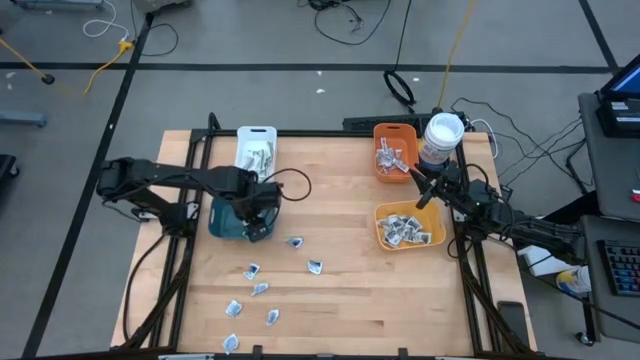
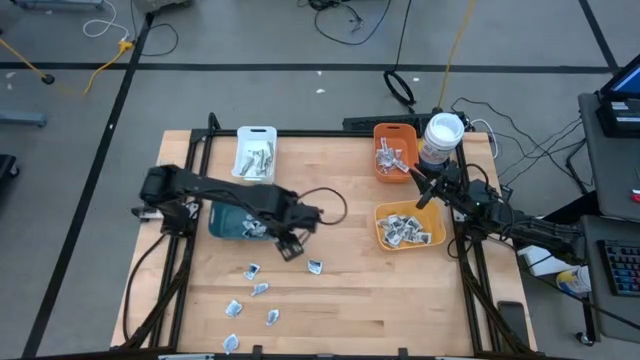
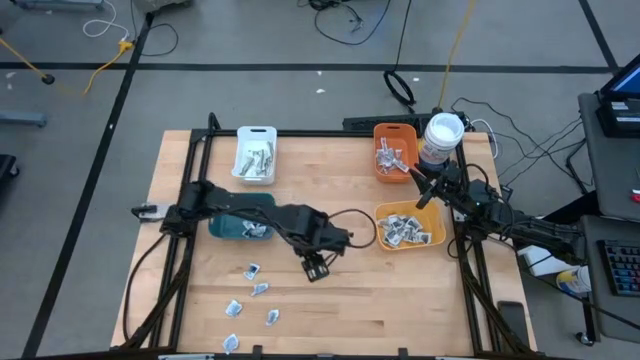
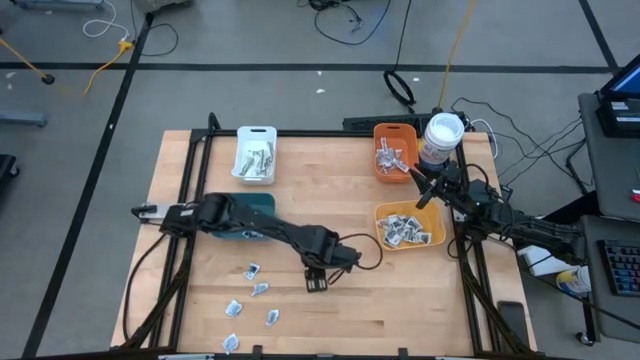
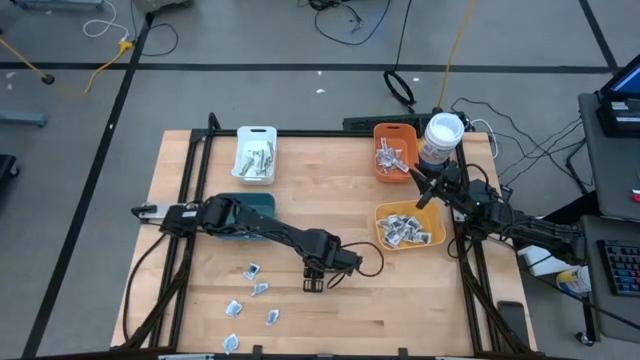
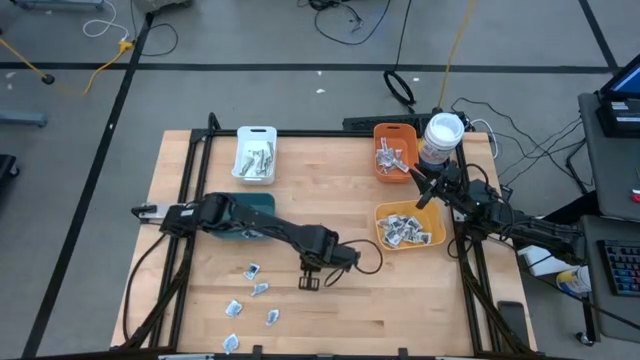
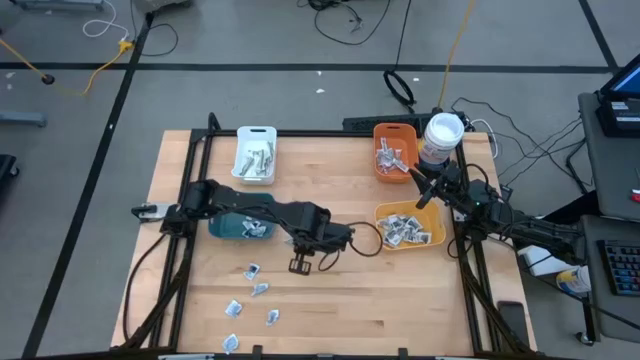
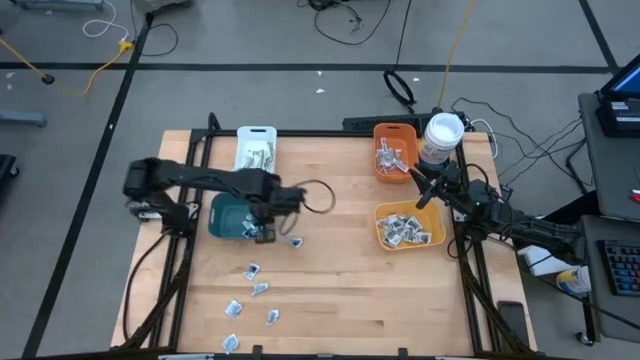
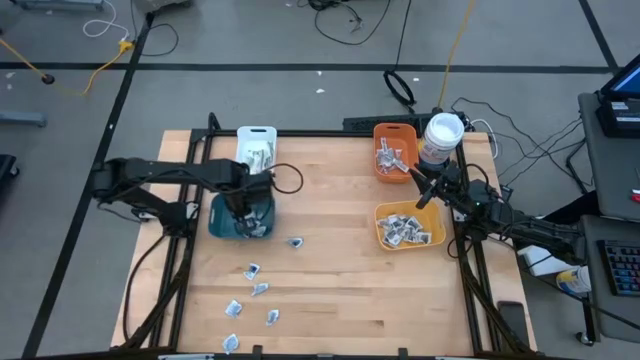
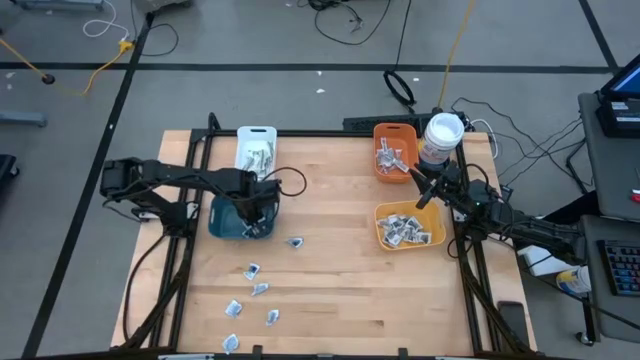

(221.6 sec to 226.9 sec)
Task: Pick & Place First Aid Supplies
Put the alcohol pad into the blue bin

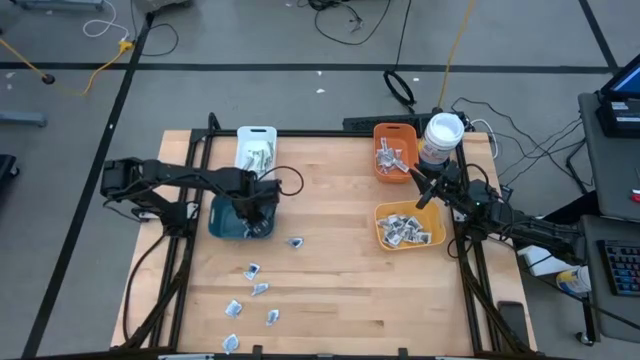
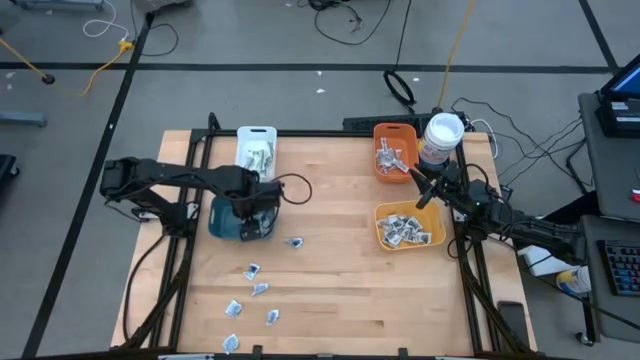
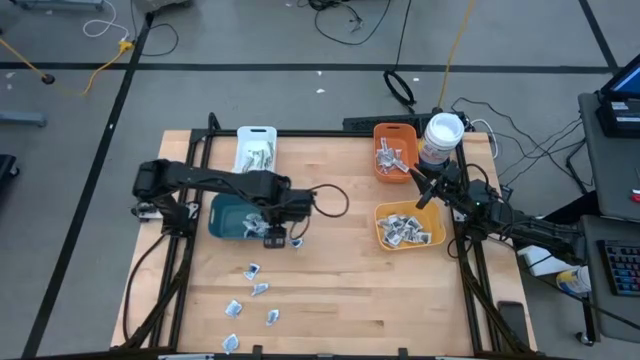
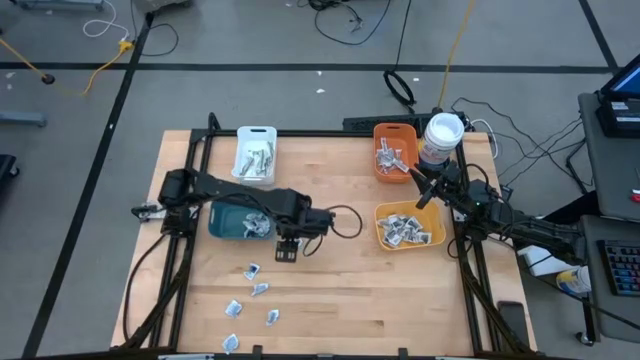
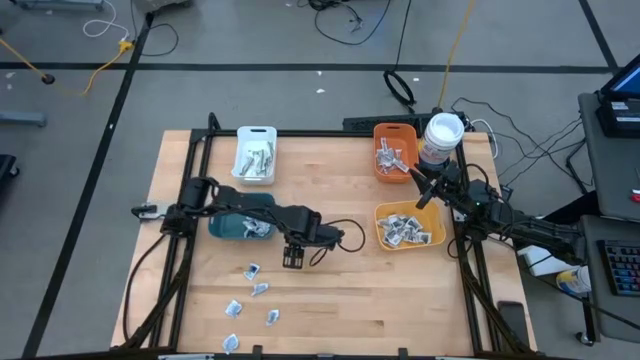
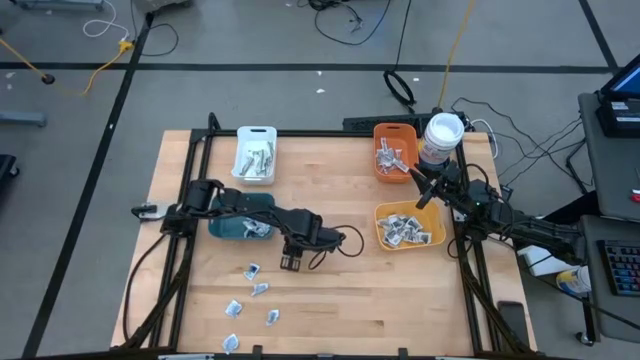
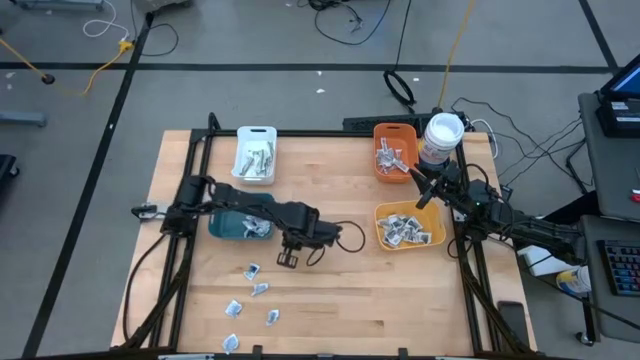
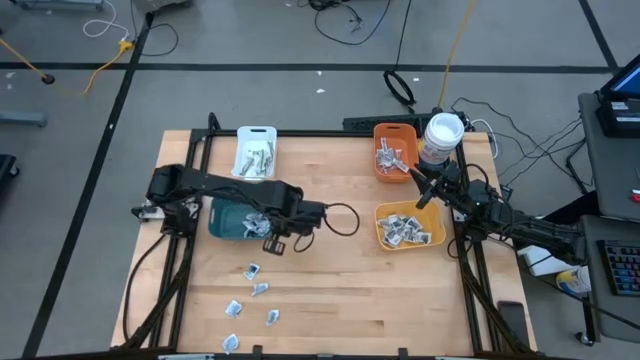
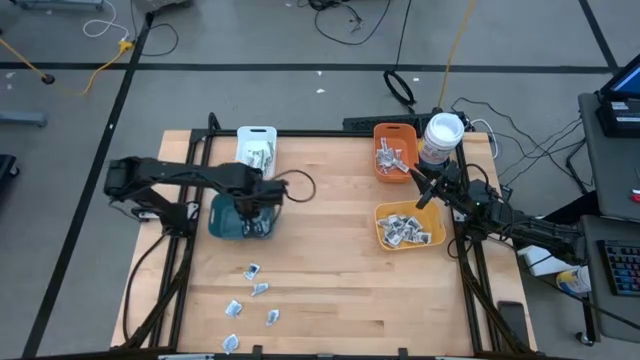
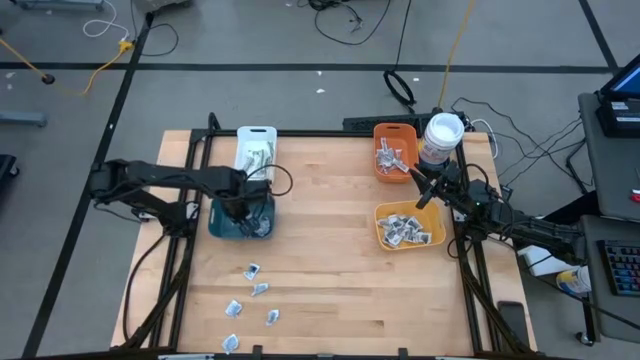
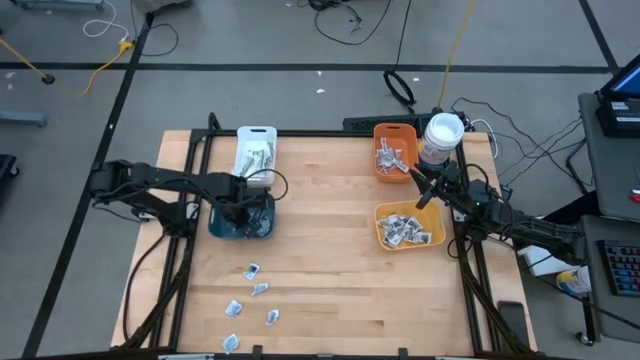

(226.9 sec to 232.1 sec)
Put the alcohol pad into the blue bin

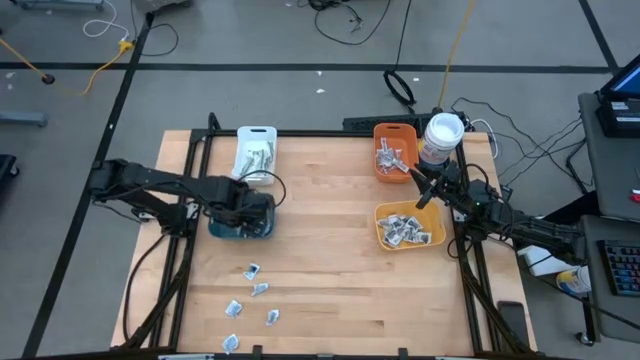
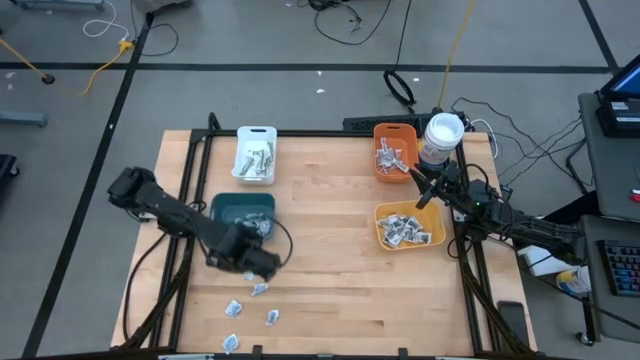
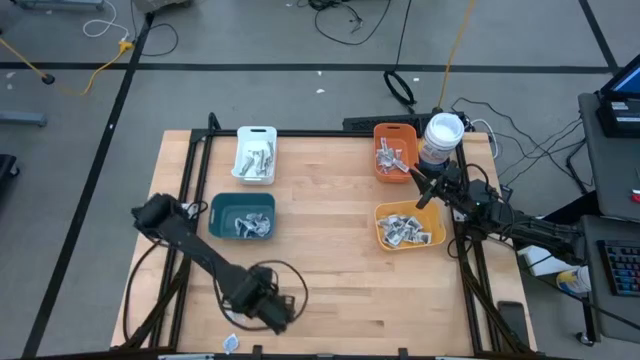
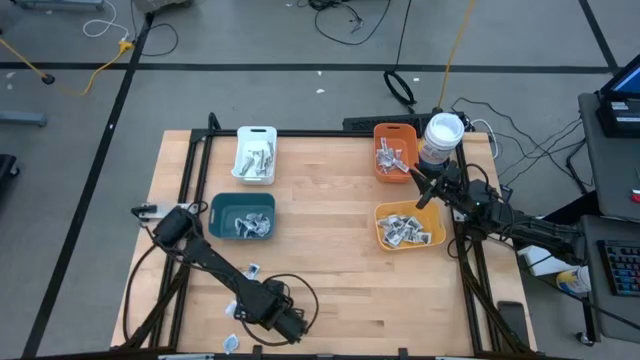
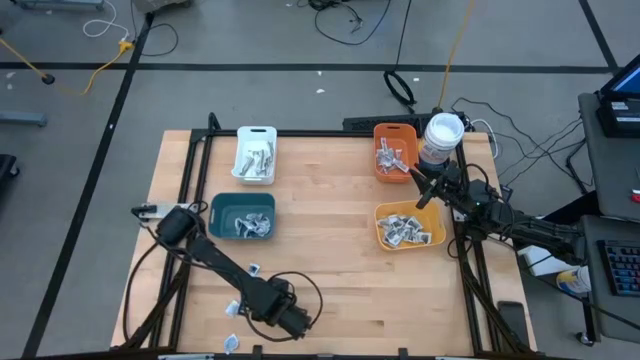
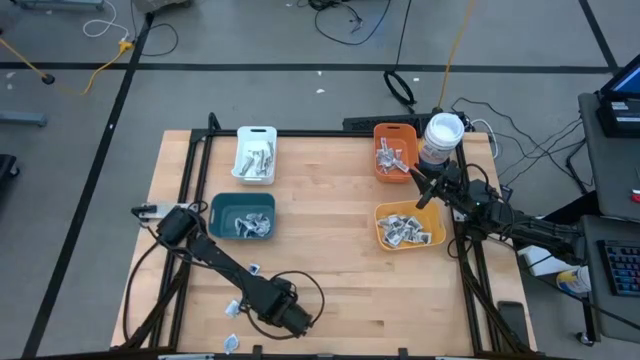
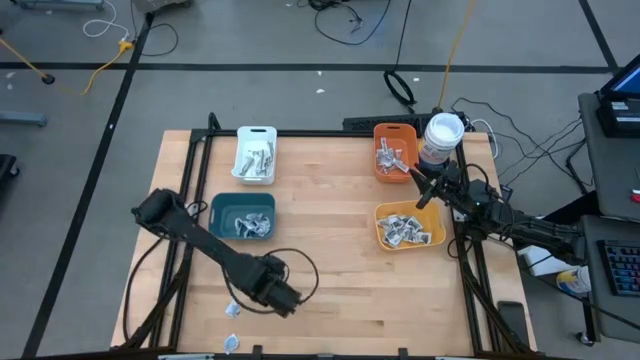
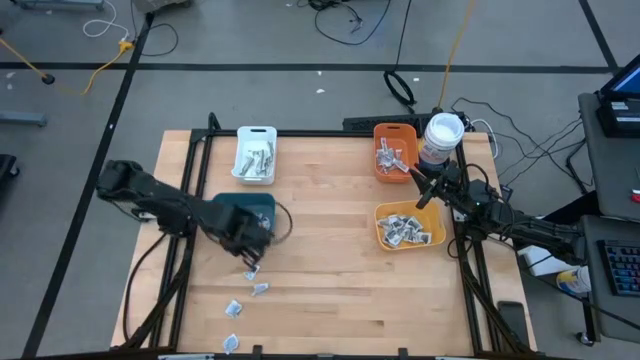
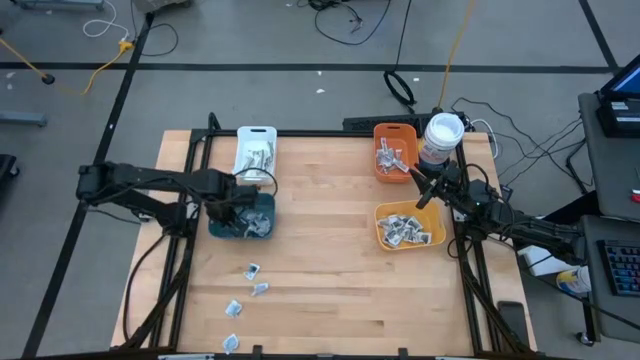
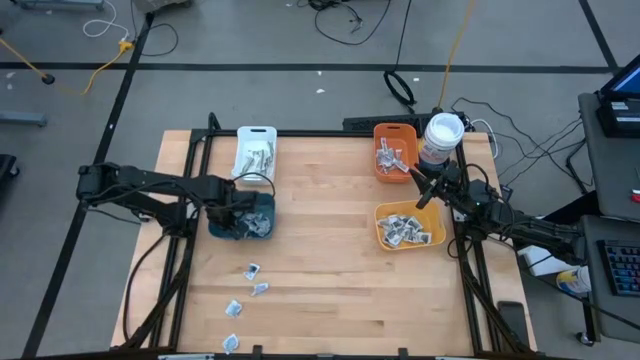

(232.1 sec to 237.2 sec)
Put the alcohol pad into the blue bin

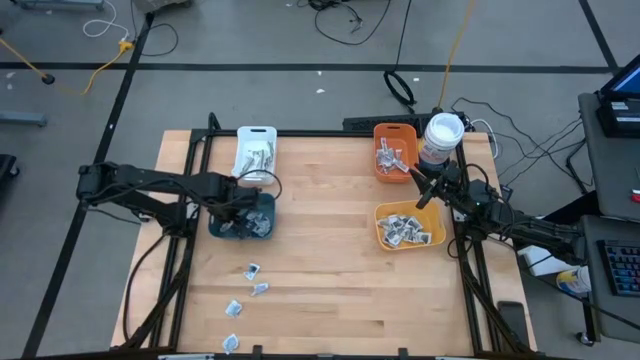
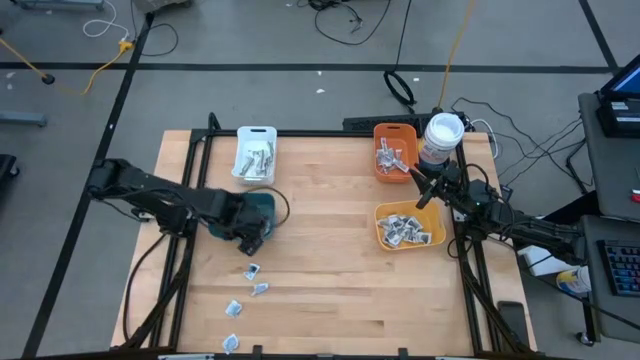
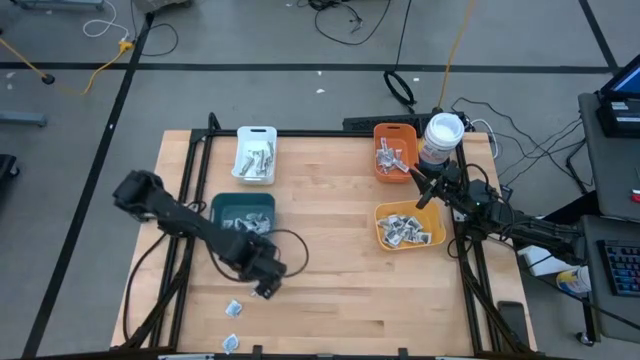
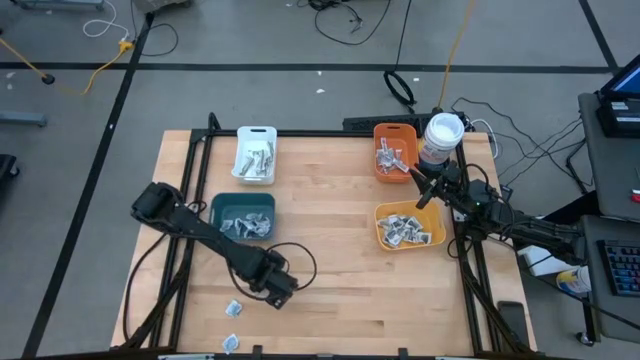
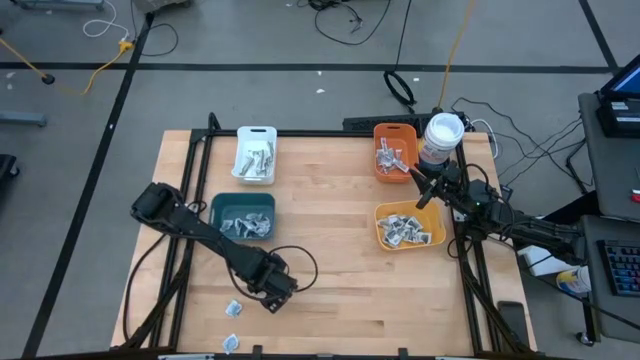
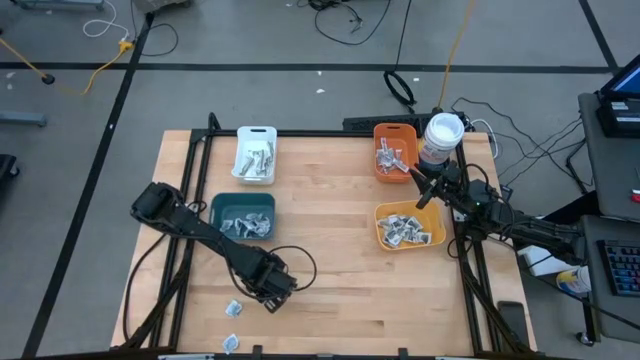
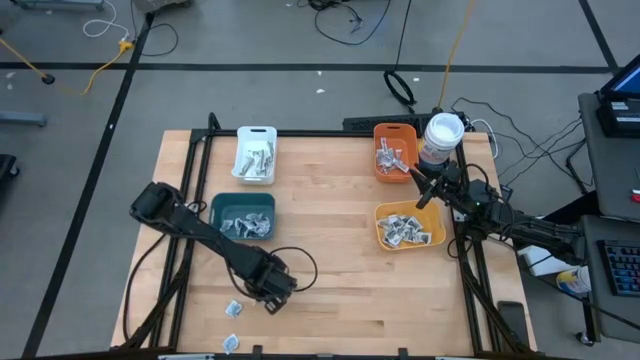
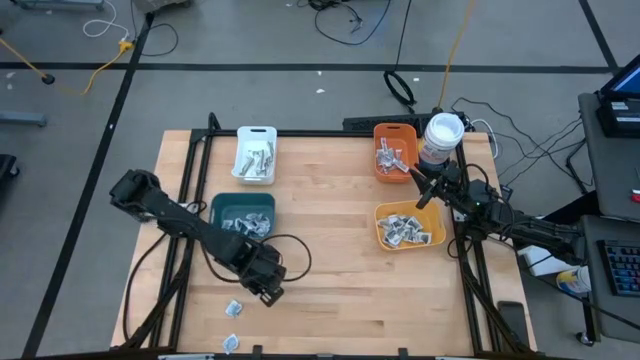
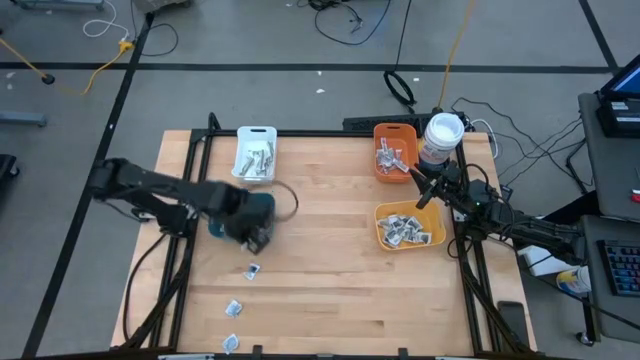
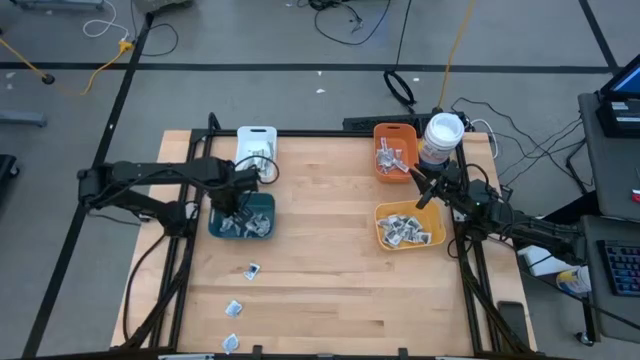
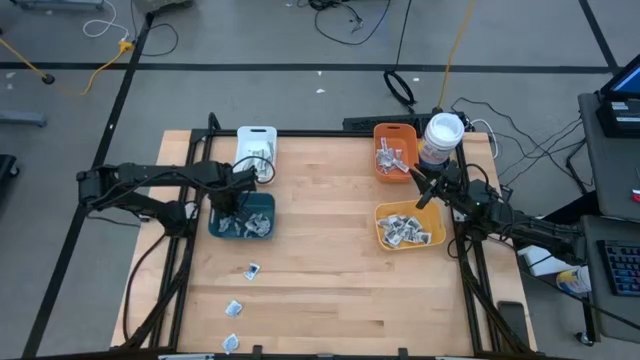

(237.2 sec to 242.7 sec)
Put the alcohol pad into the blue bin
